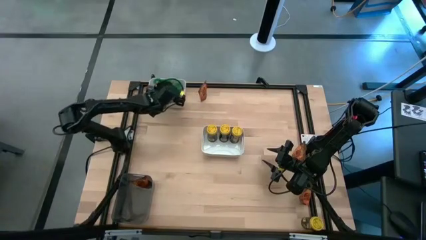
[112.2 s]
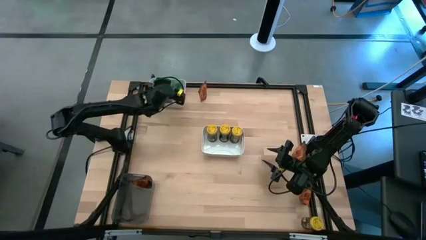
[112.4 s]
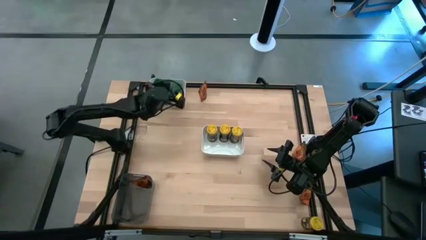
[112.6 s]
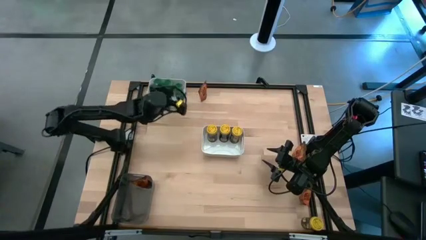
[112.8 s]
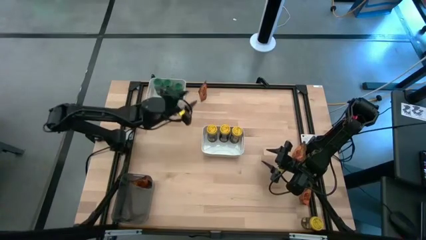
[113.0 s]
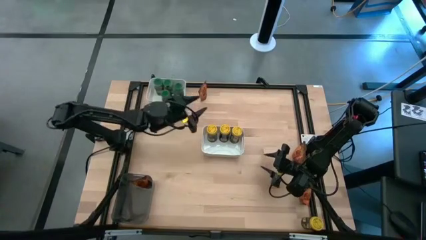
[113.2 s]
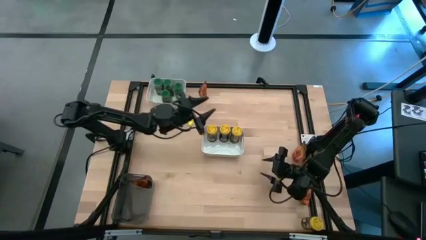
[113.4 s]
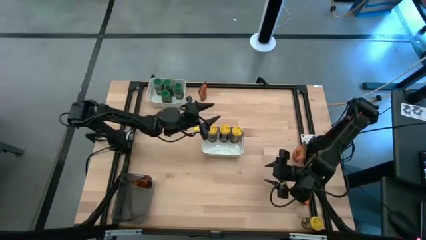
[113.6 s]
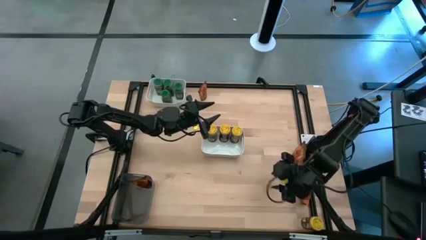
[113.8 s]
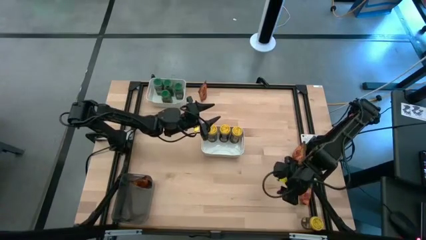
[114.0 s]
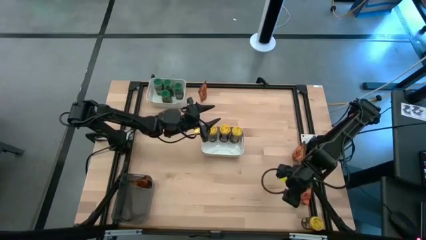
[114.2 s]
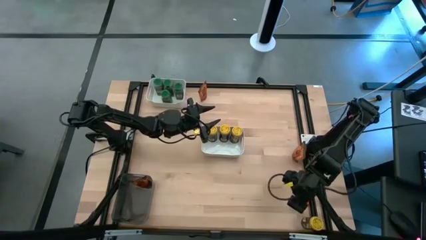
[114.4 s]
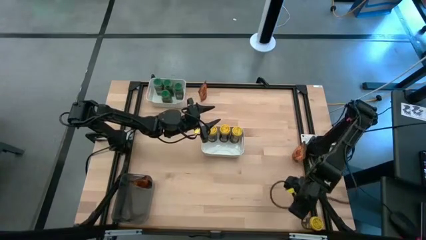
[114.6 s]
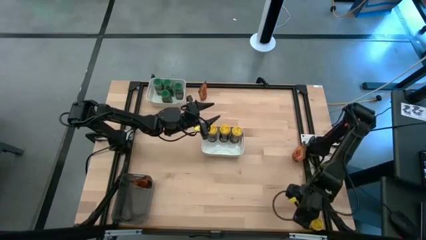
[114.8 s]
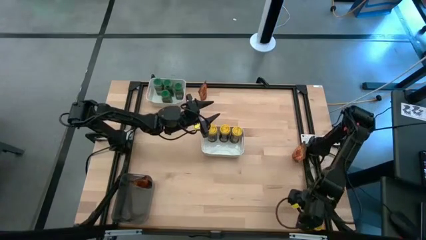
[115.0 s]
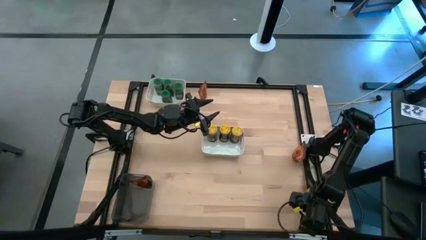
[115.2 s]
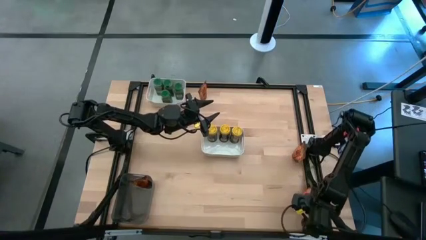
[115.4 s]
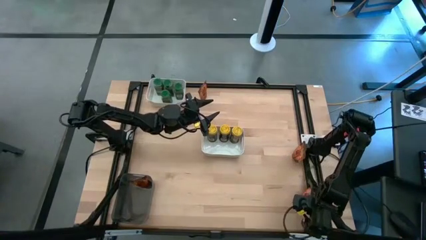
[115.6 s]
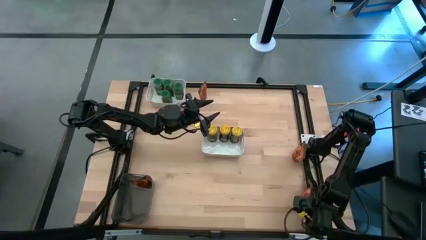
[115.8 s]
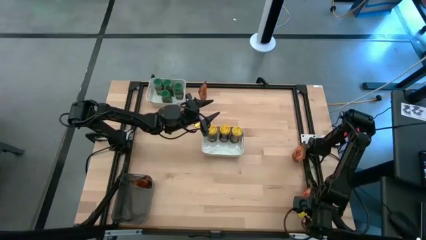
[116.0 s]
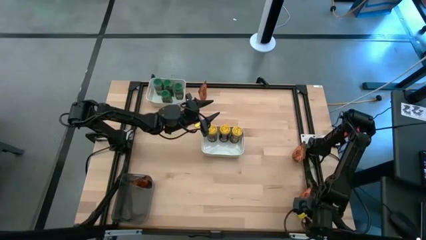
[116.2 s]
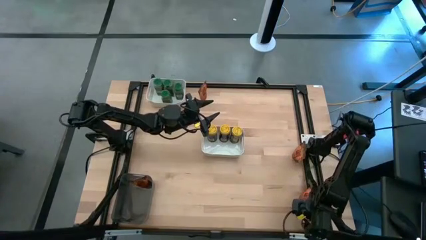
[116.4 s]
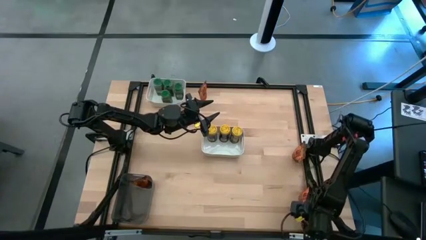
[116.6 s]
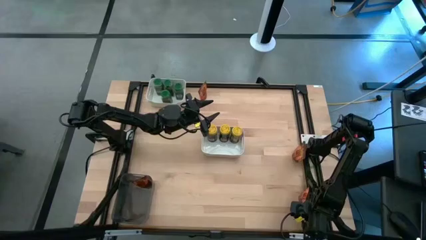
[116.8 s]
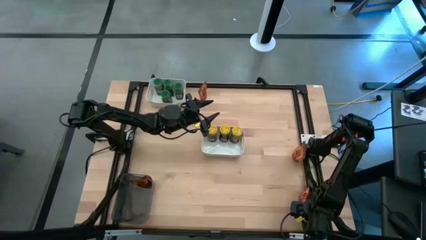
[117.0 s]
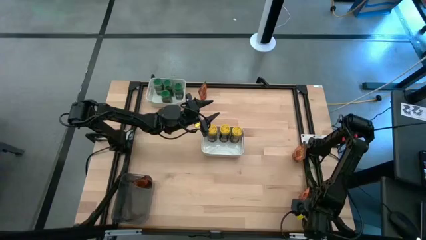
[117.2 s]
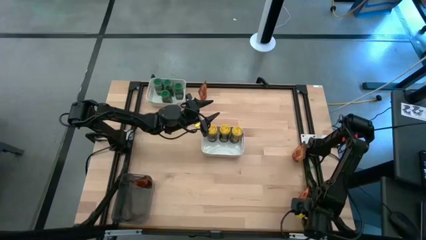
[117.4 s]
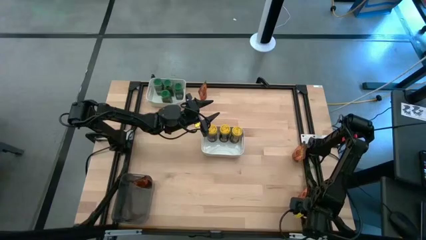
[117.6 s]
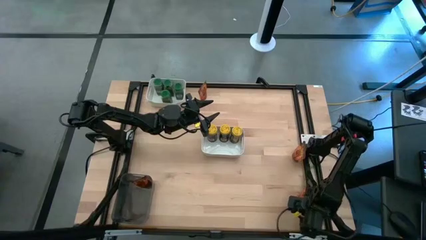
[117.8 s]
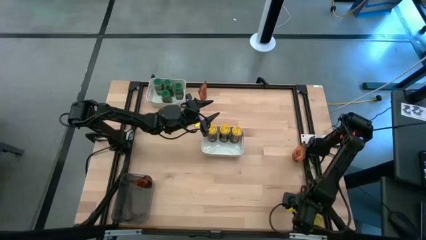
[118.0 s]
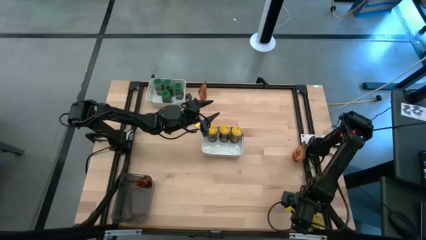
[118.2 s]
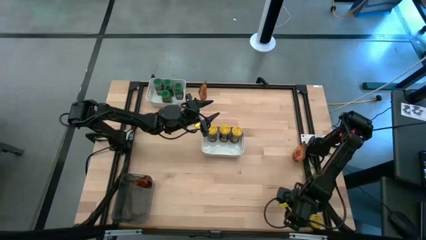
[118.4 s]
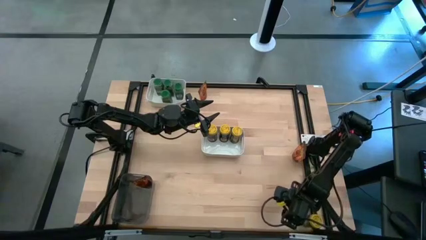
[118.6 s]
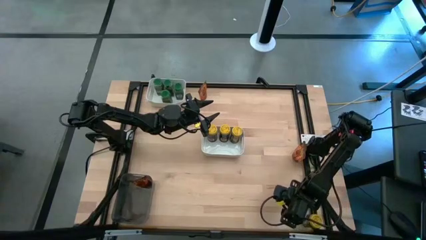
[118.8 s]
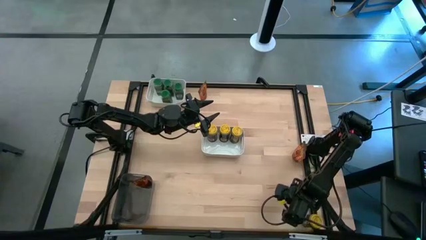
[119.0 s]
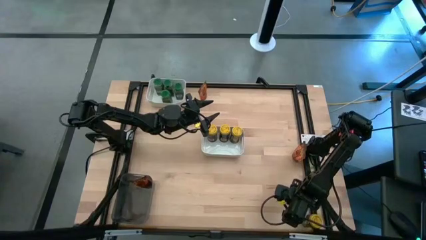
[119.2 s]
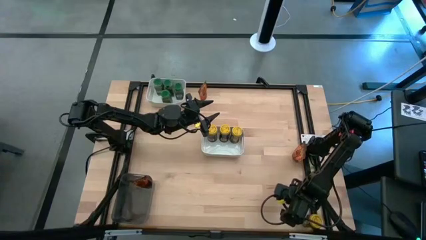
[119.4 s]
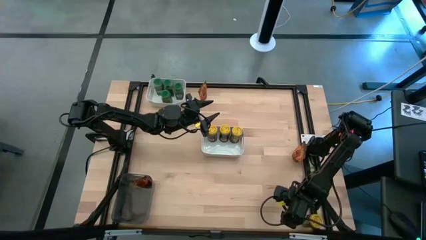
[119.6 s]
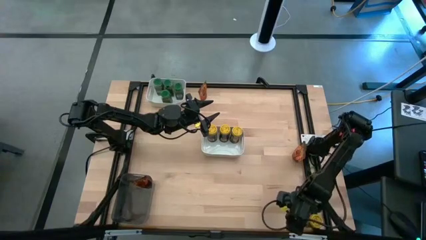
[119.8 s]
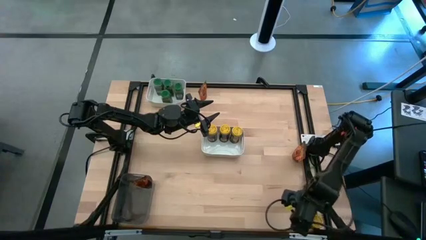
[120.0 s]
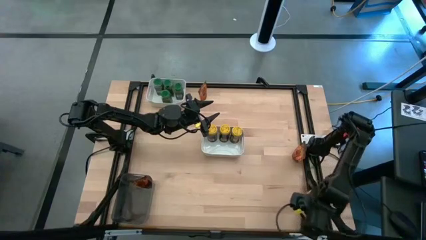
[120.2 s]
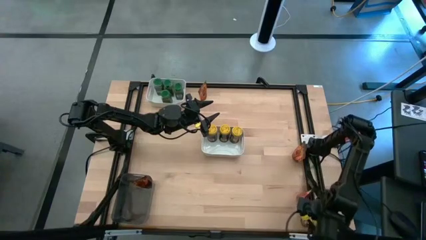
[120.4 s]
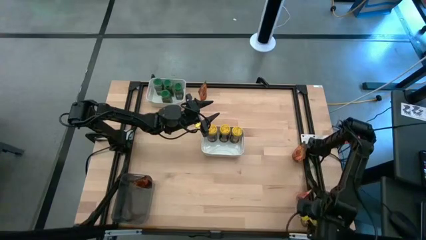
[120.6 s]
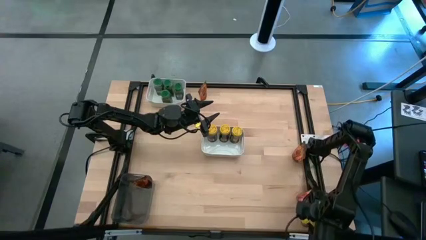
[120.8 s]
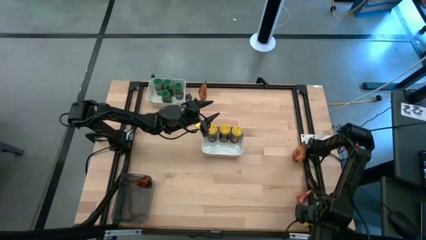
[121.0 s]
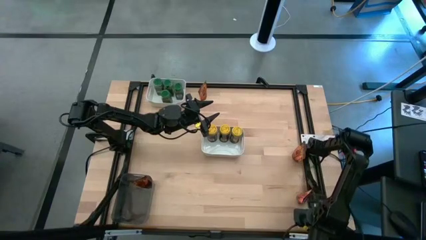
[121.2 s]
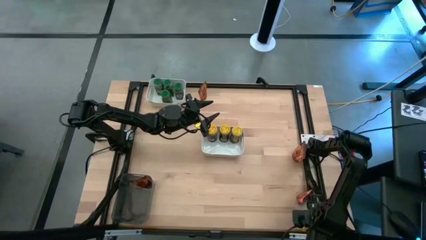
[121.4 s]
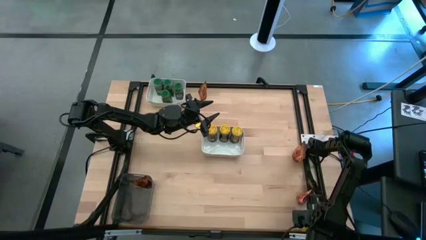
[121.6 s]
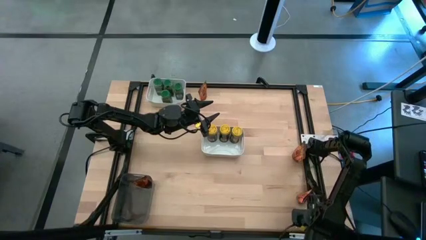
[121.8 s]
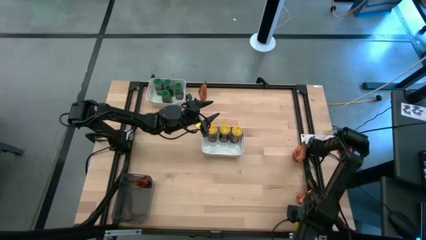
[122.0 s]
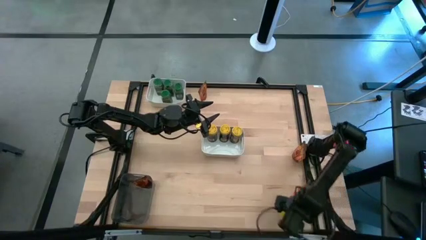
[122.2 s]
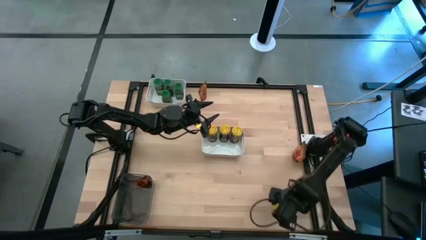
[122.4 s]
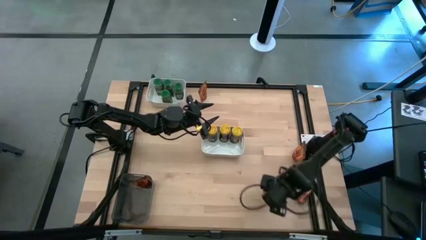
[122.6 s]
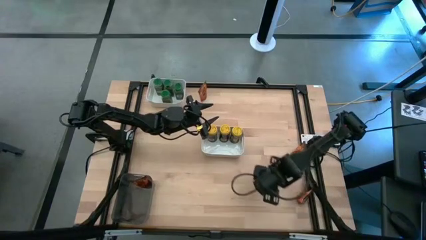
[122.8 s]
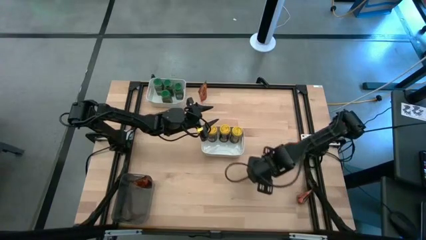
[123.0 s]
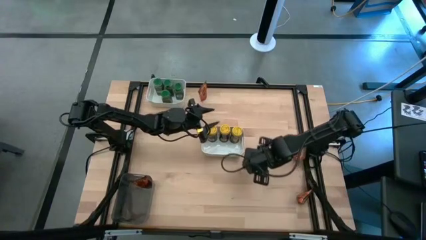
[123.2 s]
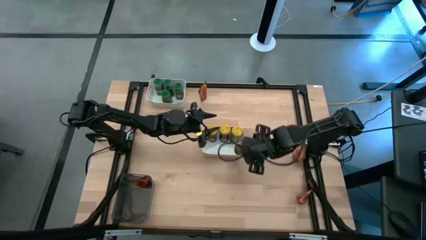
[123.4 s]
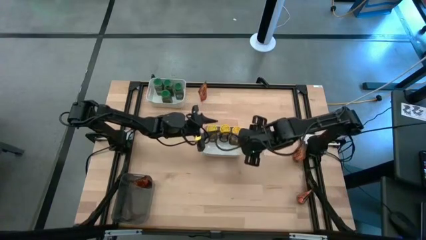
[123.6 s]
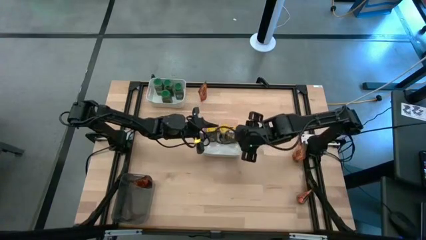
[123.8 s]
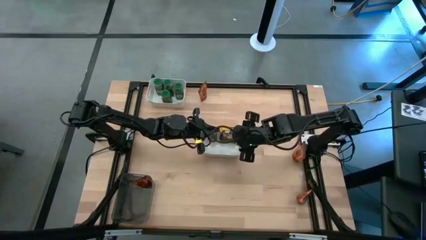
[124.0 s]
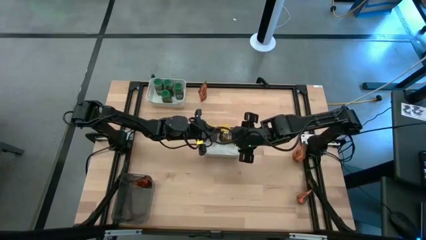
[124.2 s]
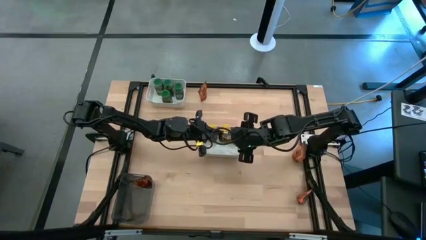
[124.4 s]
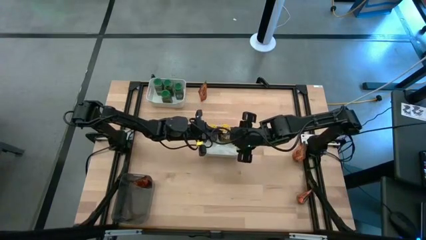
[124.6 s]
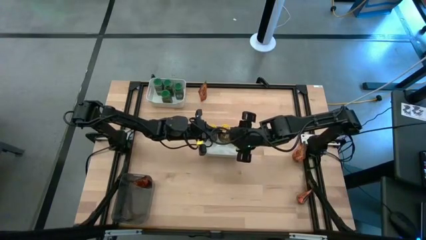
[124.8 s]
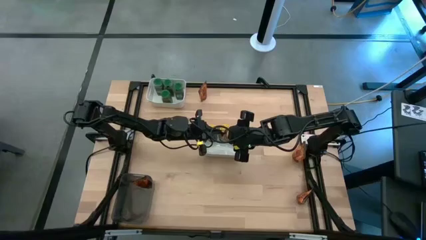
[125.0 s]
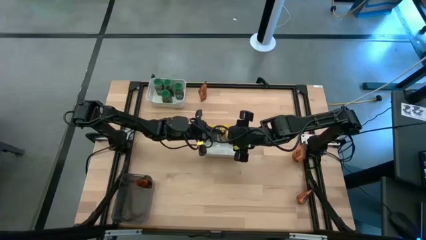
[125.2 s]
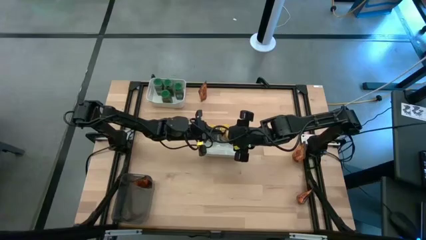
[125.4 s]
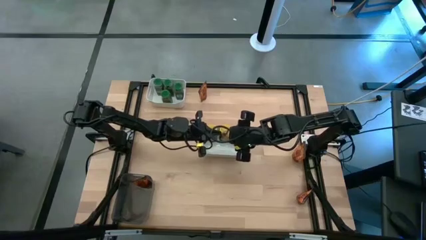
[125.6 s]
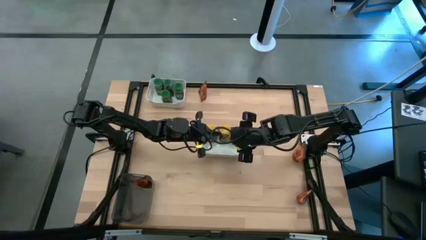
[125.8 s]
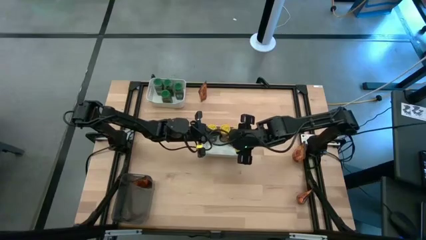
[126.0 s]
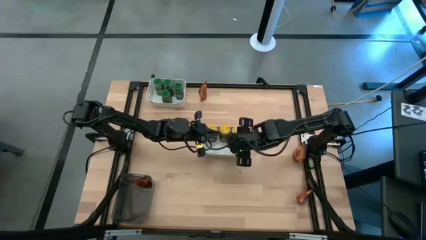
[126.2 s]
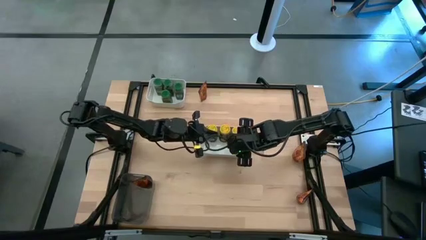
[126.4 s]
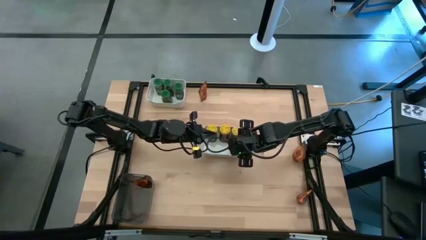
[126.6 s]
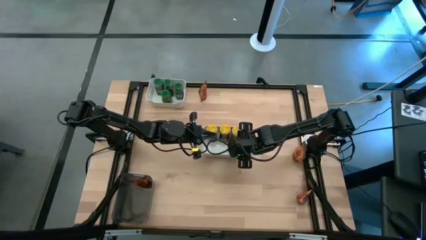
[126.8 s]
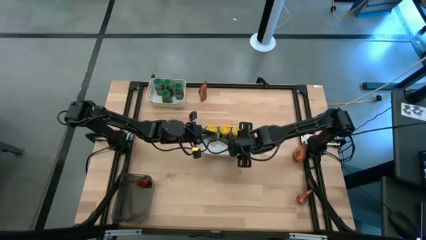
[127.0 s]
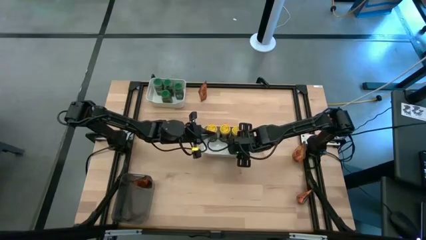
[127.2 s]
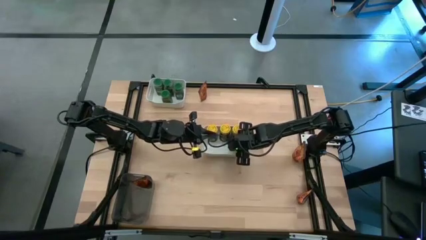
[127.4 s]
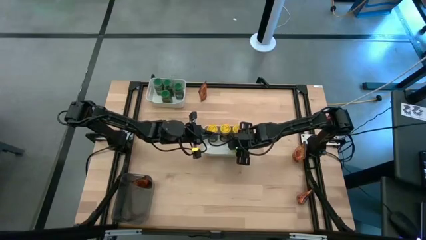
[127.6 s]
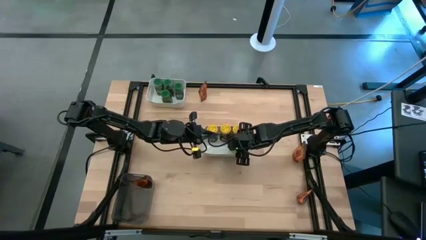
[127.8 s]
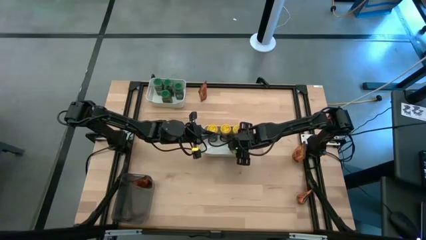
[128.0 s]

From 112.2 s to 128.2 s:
Task: Sort spices by type
Put the yellow seasoning bottle into the bottom white bin
